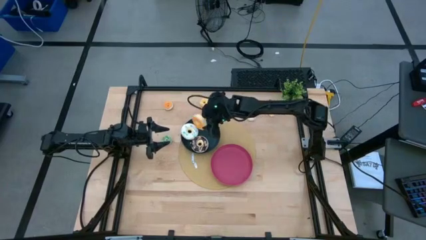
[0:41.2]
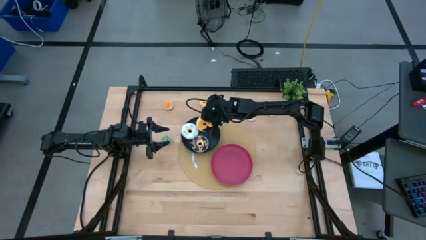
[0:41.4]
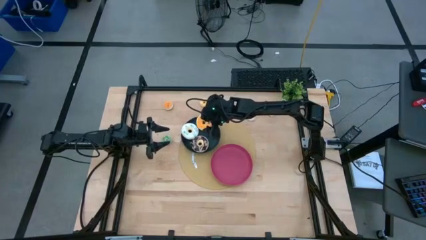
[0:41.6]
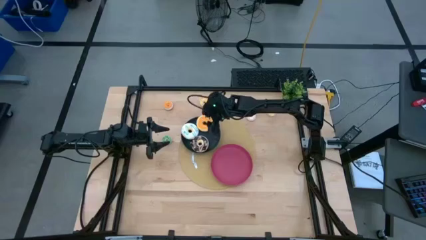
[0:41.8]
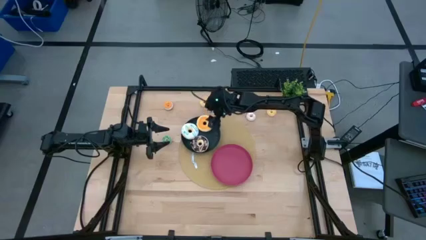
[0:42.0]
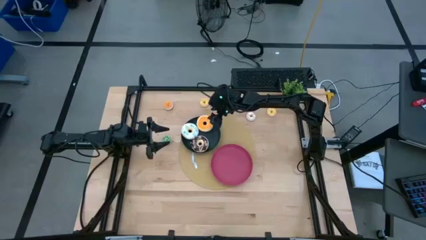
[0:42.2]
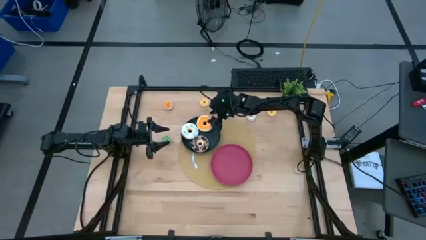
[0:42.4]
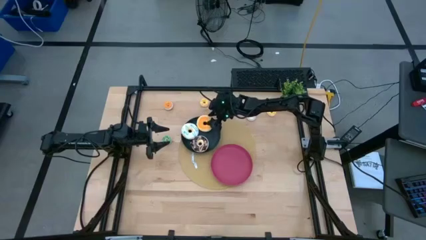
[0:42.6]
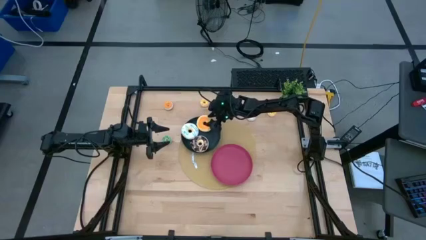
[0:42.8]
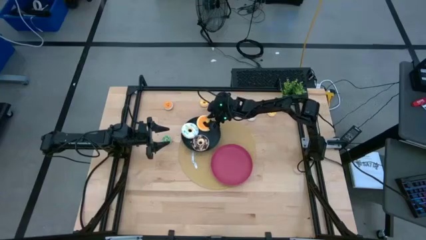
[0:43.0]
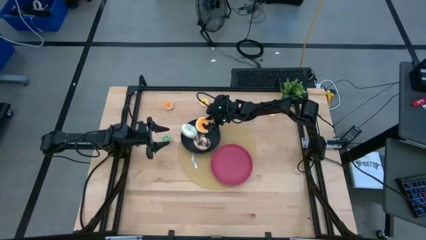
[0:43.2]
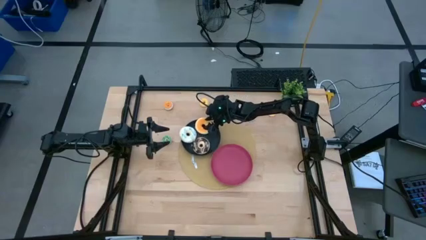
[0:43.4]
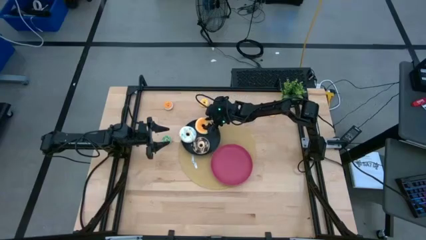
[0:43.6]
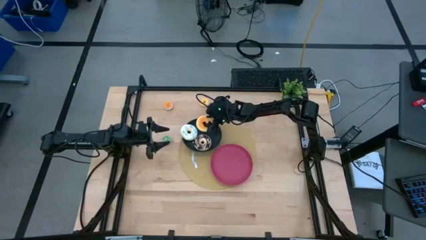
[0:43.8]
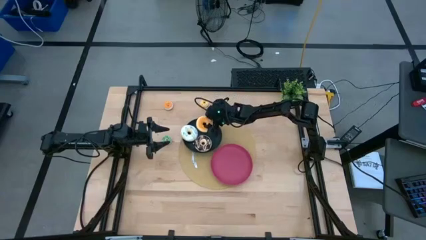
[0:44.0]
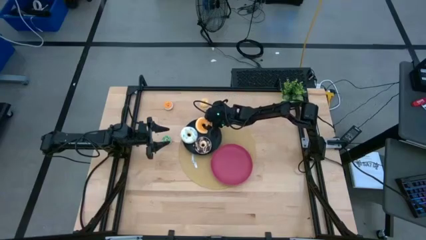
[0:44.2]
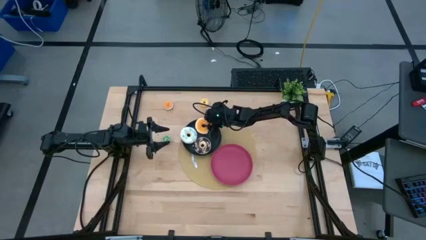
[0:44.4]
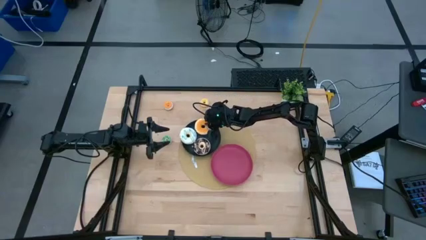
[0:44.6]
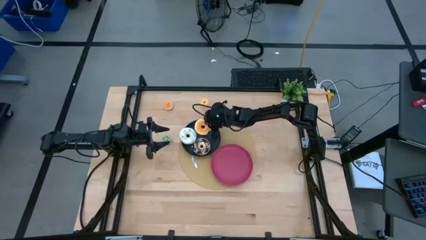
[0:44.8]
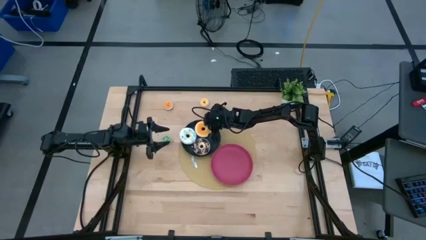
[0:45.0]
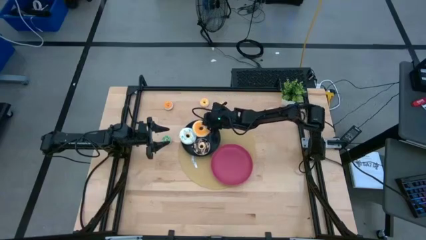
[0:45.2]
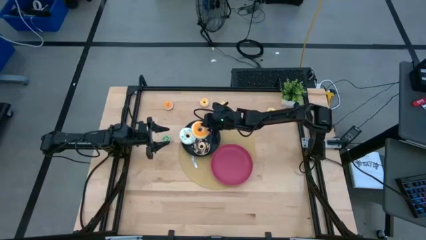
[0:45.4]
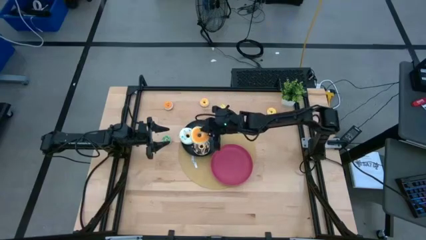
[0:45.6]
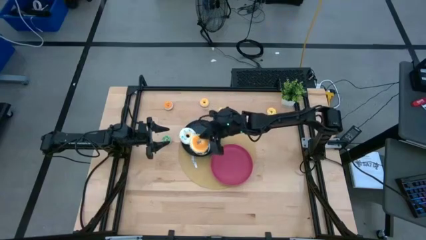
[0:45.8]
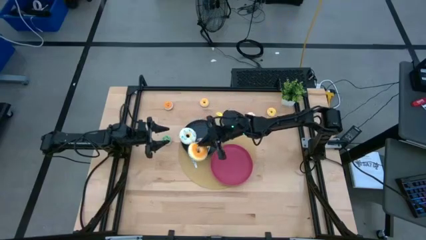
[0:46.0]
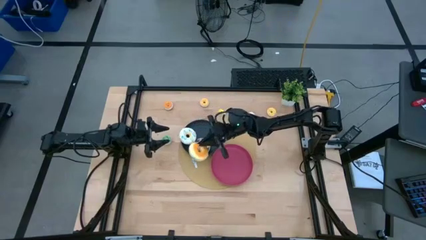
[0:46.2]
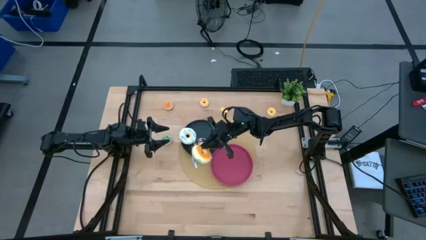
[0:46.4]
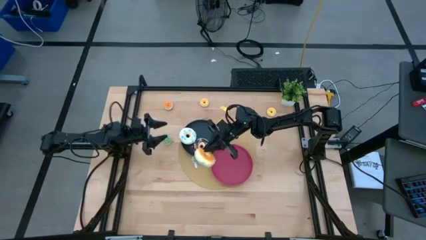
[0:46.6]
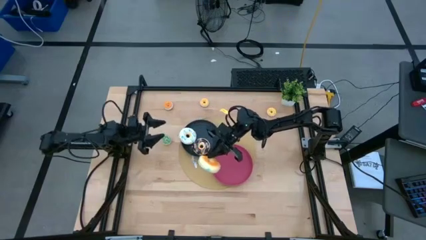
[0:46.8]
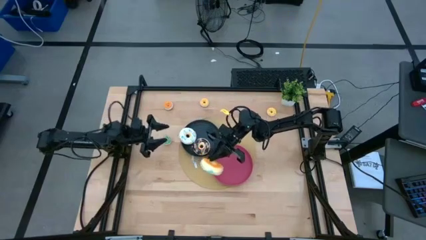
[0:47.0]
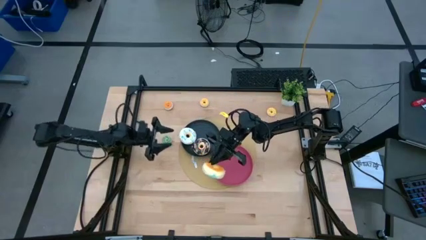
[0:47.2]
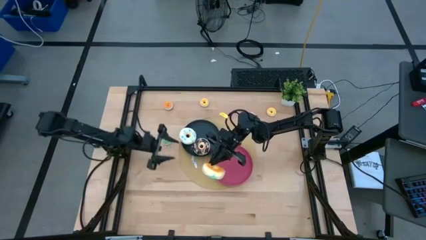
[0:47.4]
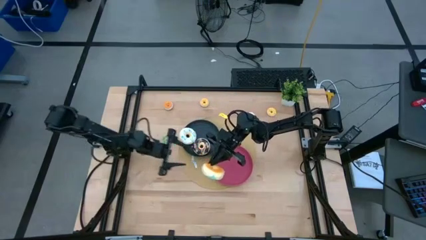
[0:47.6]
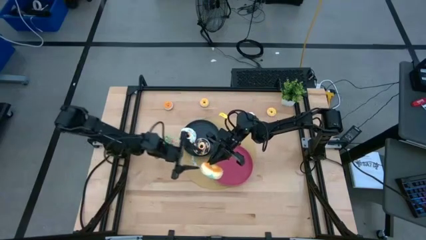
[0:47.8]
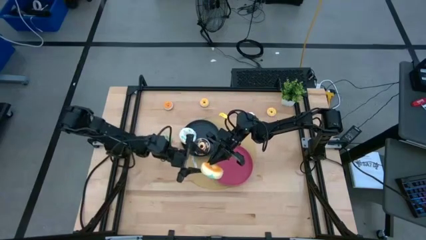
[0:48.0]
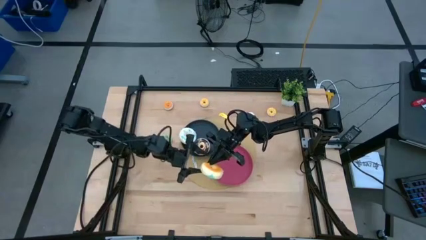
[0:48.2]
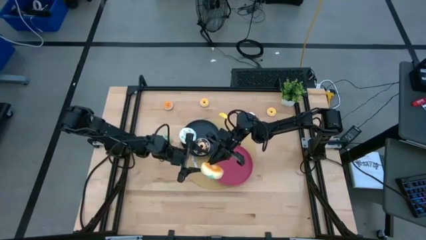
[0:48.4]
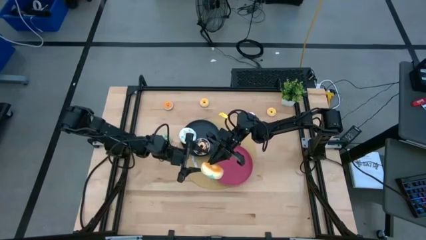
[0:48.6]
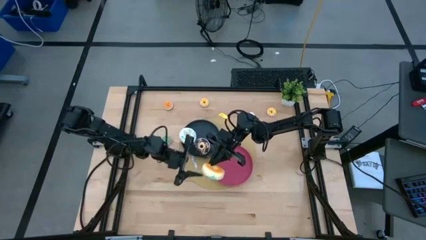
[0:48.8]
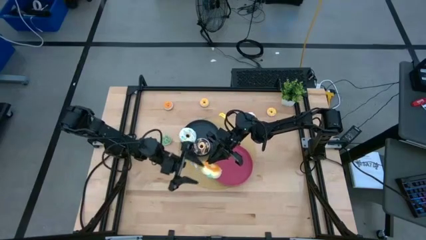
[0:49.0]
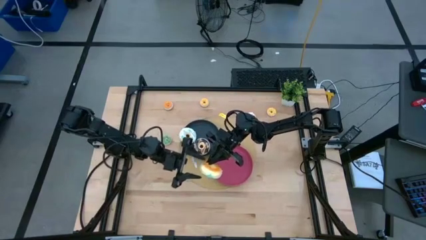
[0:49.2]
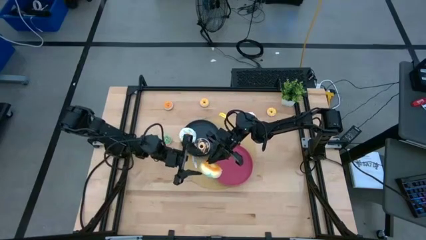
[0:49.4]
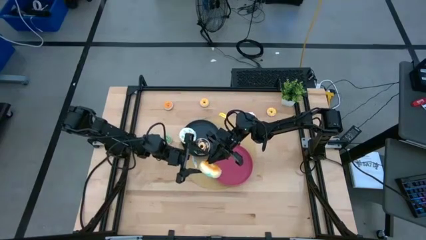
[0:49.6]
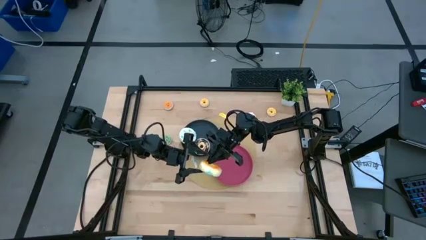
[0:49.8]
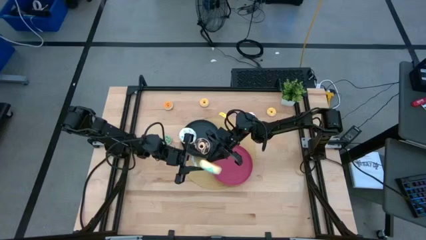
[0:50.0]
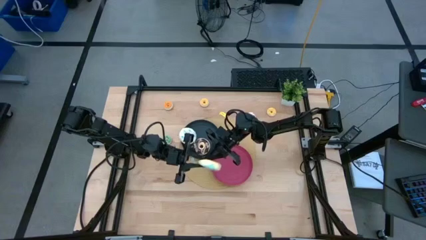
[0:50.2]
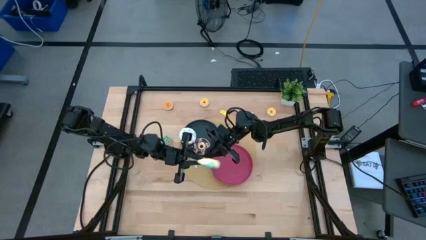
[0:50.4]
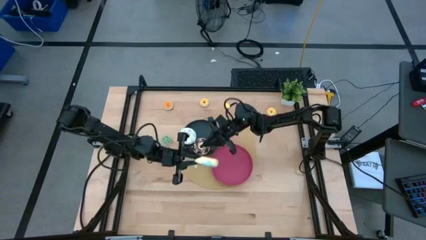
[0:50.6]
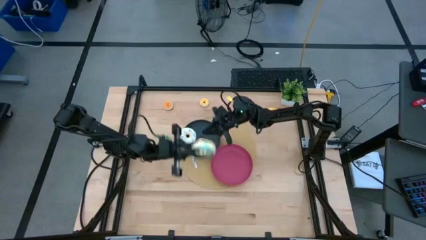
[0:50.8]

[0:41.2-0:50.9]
Task: Pick & Place donuts
Put the large blue donut on the black plate

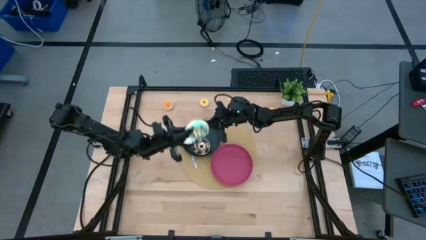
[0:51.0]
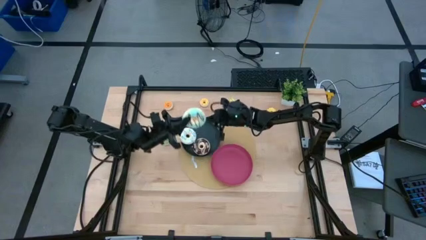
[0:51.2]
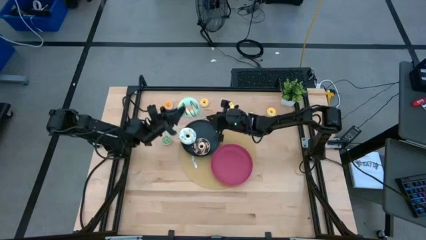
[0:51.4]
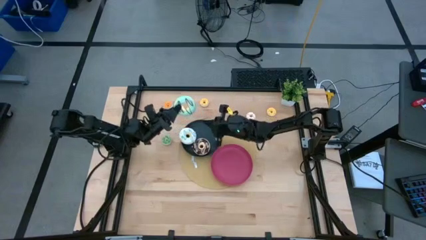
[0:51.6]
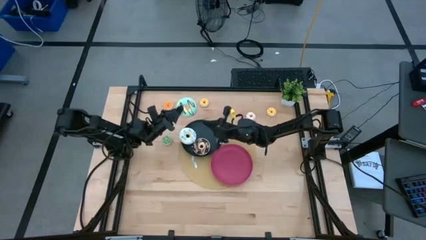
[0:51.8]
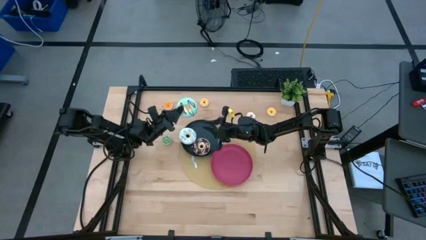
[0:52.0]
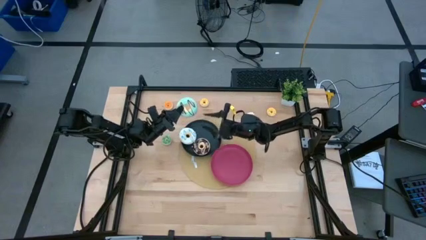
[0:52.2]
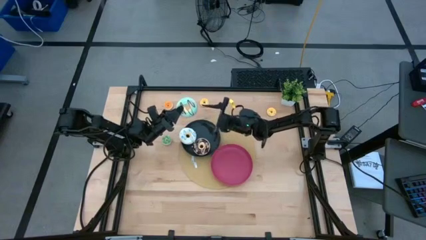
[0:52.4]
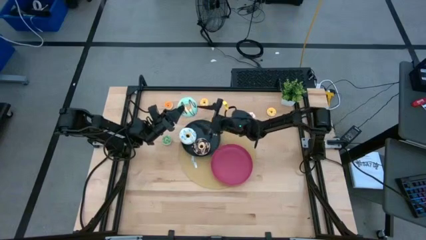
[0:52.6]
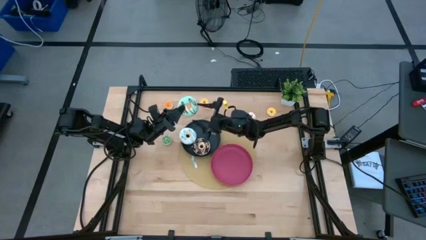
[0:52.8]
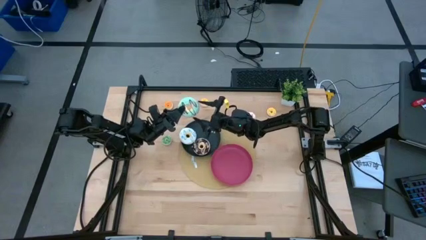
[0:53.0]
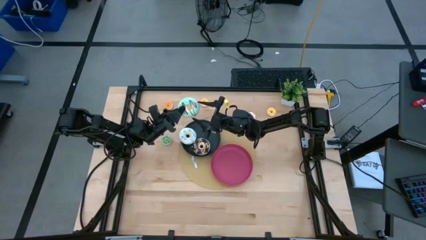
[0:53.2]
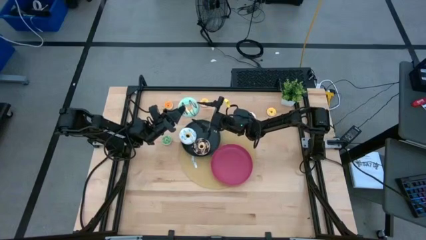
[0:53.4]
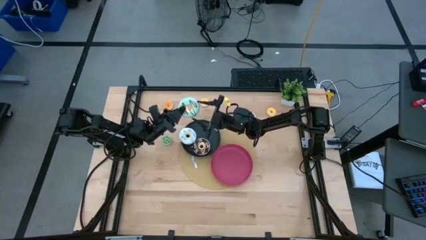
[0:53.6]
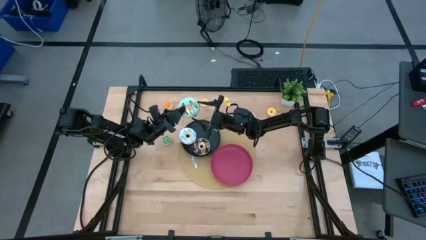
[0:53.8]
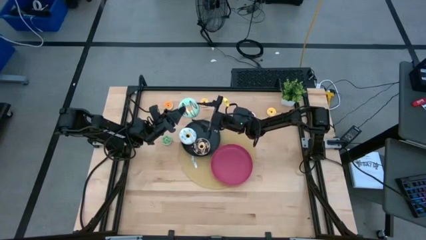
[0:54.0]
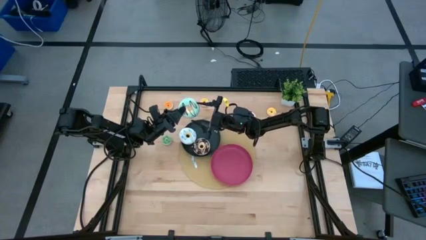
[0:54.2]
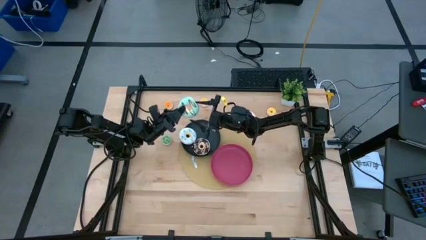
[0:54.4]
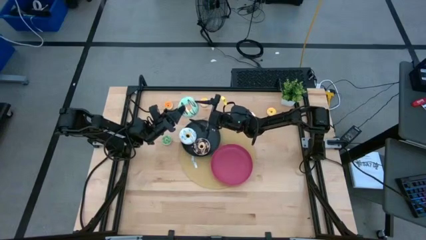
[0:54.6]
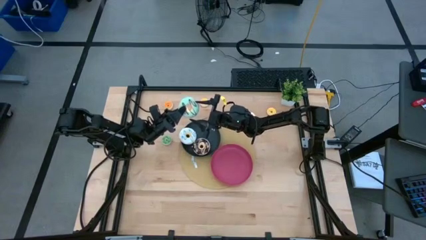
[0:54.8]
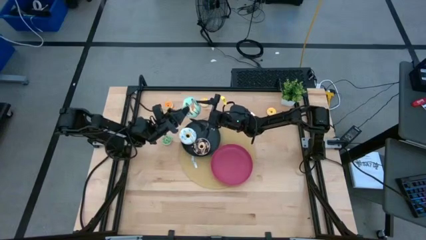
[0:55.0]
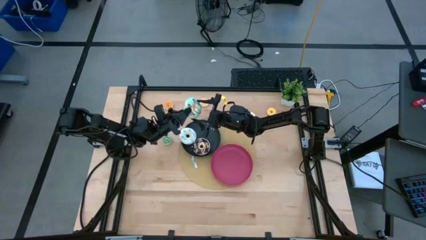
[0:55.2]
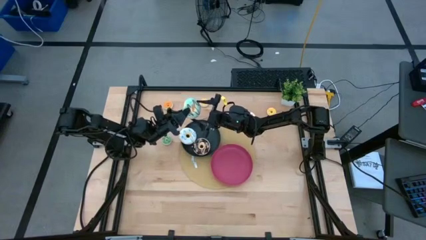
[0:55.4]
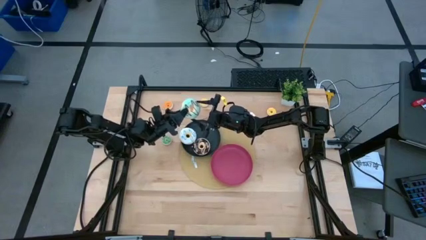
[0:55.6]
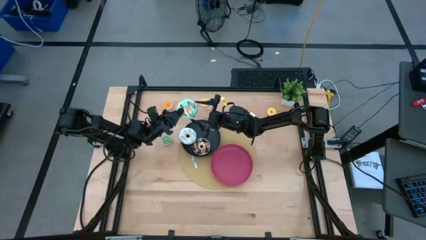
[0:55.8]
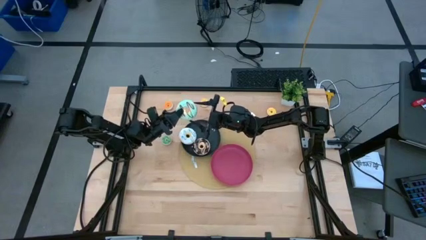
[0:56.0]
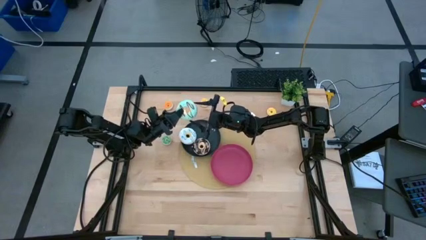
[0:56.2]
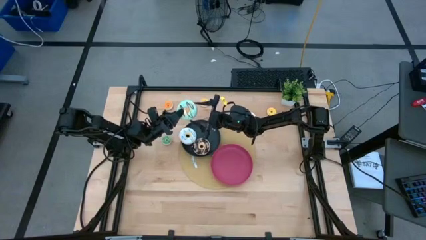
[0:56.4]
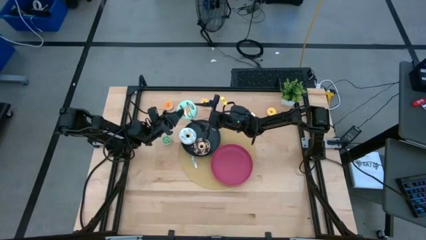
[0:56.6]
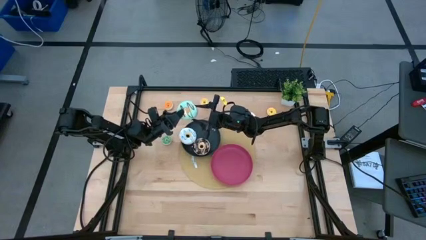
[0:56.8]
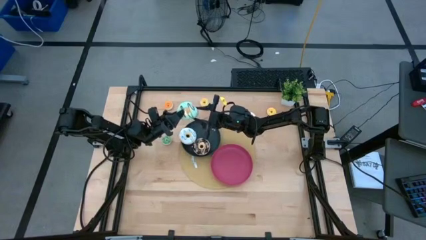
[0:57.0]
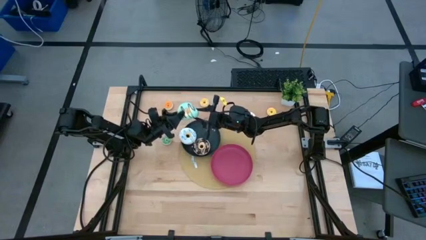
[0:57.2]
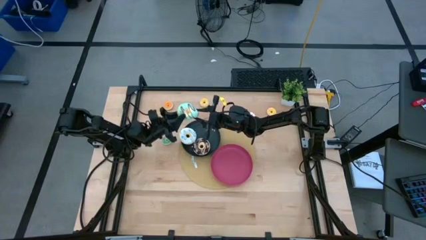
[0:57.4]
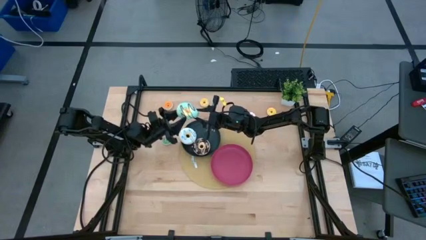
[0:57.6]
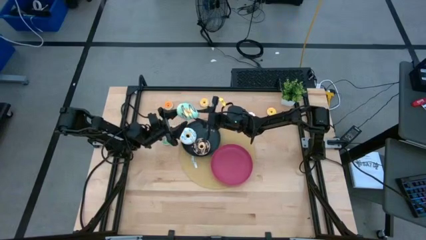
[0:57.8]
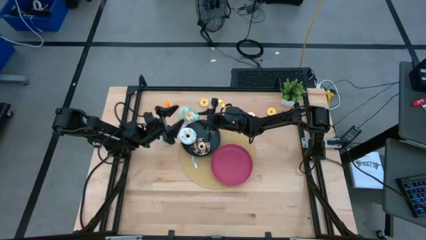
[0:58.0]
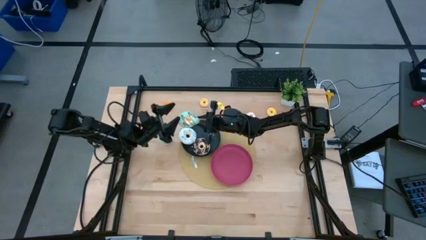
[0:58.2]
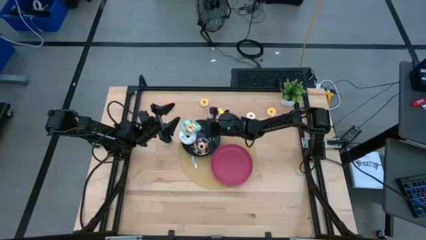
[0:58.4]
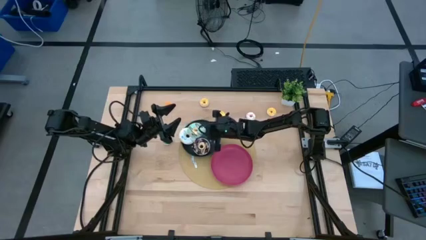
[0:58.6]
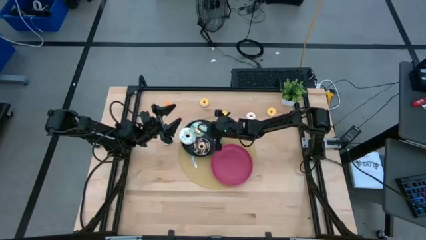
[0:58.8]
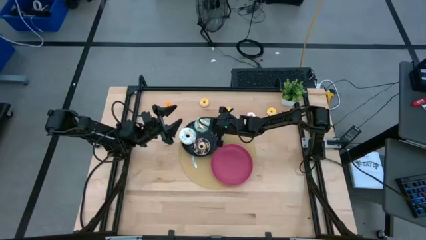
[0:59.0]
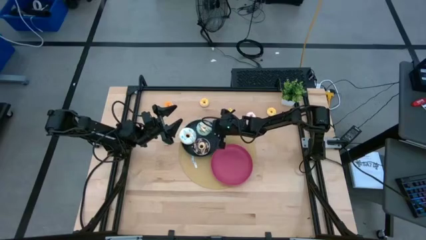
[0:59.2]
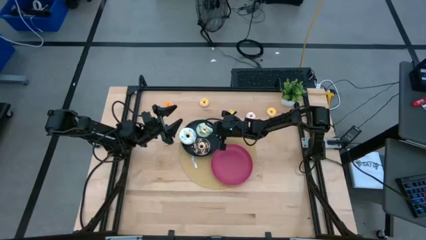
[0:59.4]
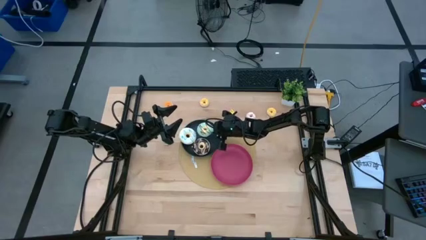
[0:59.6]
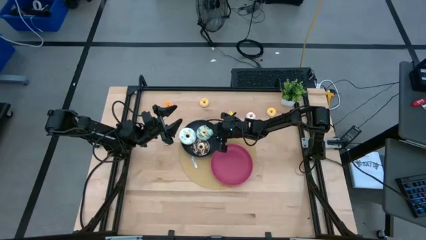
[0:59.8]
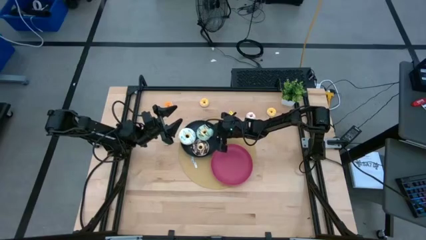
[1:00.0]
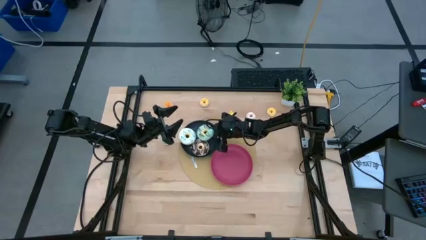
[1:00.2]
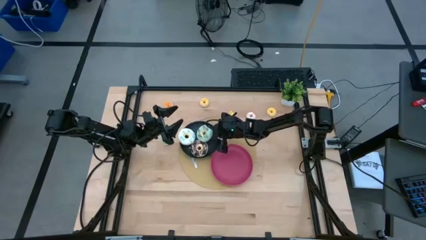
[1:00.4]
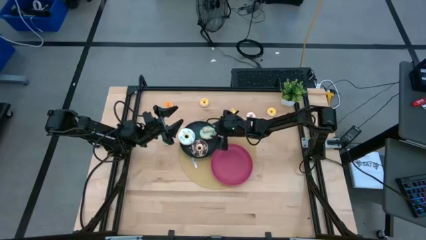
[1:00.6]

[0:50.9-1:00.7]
Put the large blue donut on the black plate
